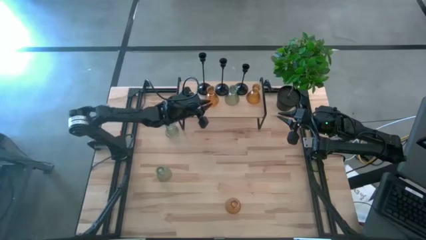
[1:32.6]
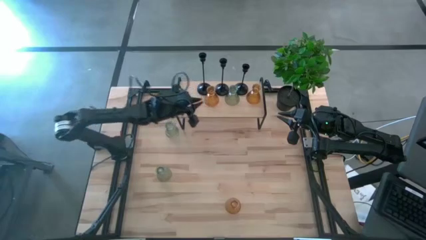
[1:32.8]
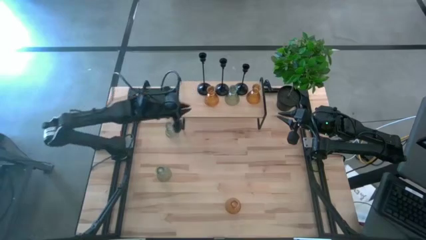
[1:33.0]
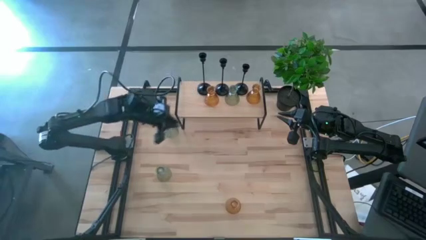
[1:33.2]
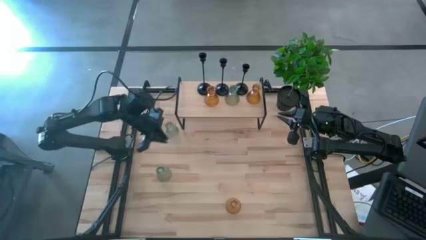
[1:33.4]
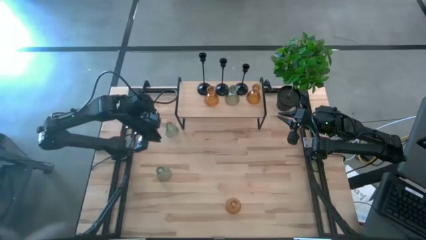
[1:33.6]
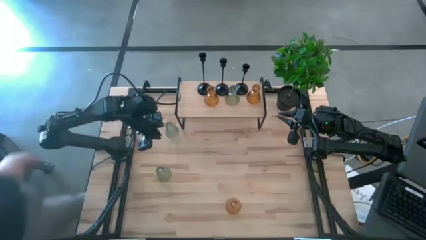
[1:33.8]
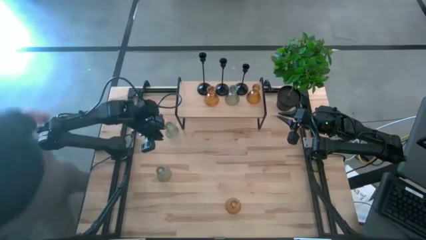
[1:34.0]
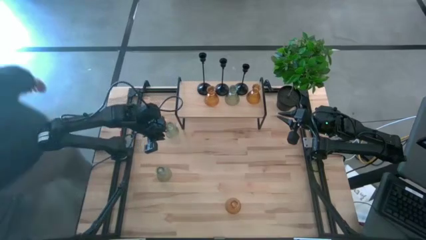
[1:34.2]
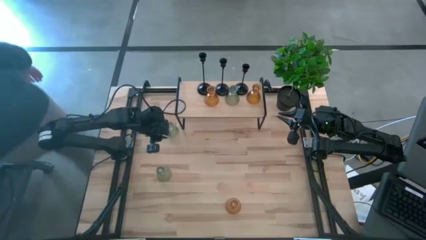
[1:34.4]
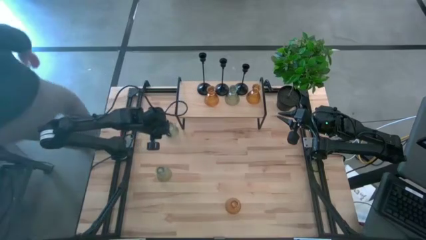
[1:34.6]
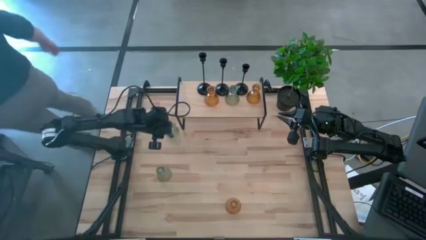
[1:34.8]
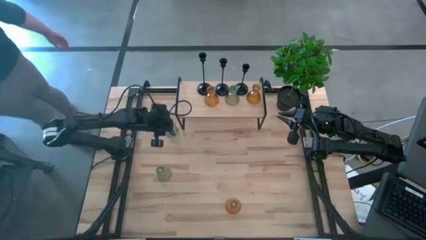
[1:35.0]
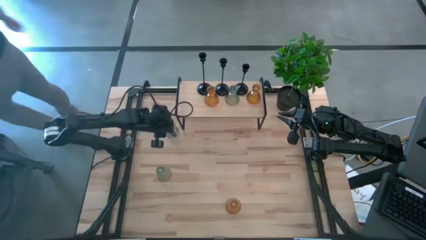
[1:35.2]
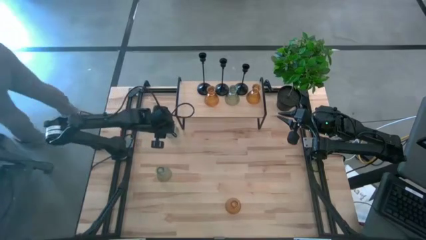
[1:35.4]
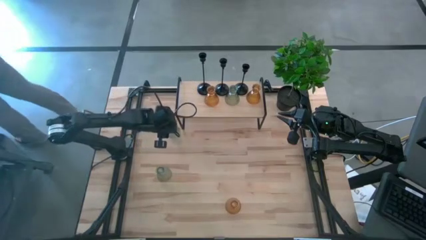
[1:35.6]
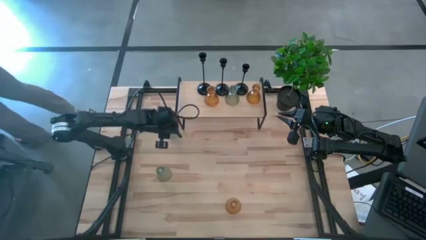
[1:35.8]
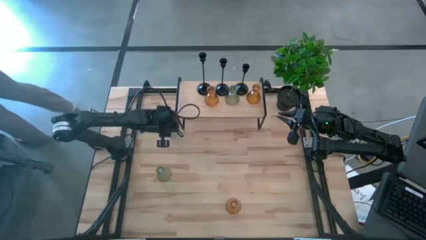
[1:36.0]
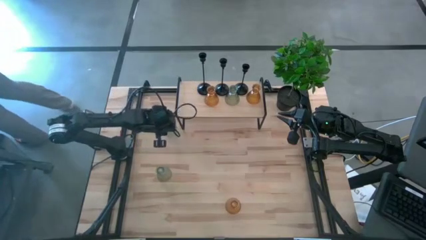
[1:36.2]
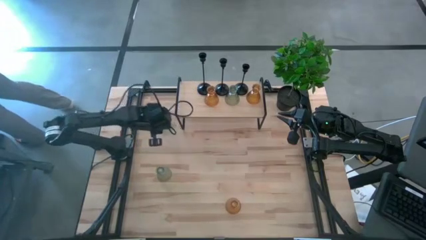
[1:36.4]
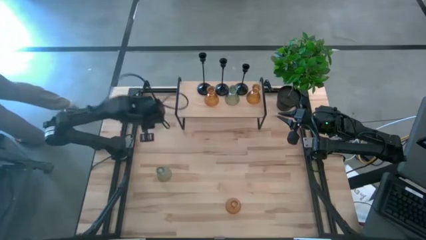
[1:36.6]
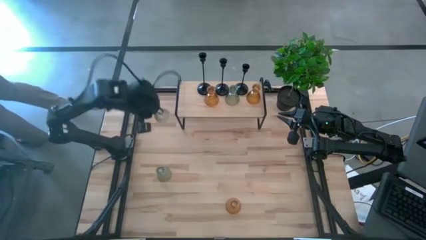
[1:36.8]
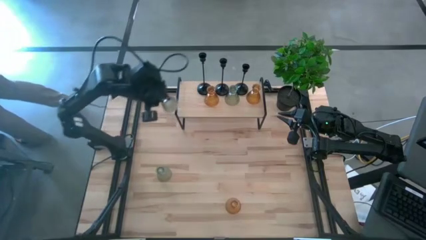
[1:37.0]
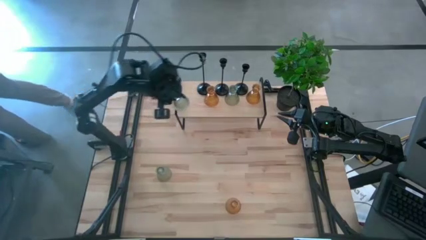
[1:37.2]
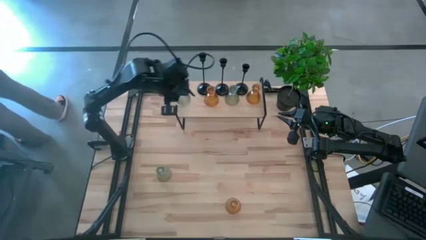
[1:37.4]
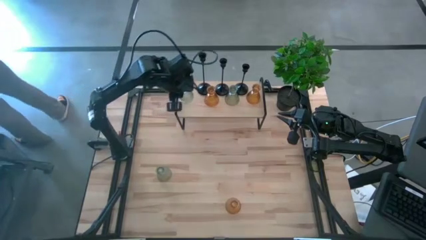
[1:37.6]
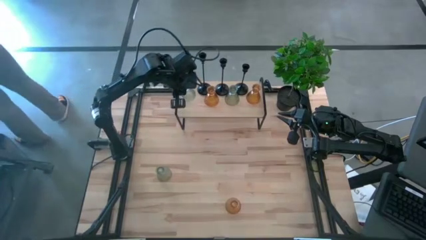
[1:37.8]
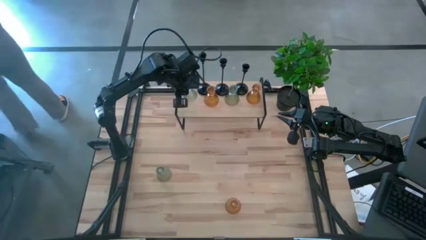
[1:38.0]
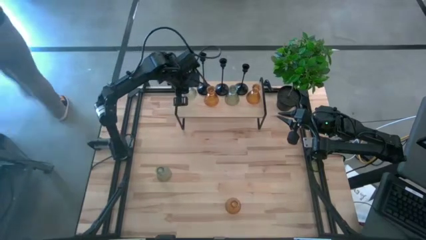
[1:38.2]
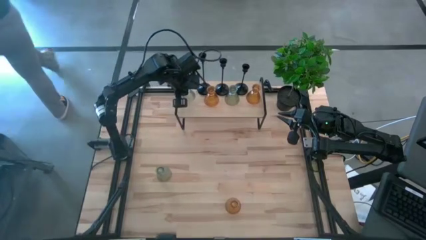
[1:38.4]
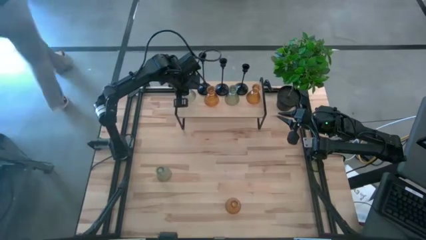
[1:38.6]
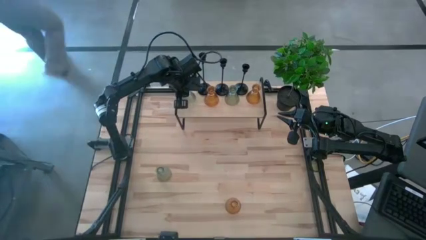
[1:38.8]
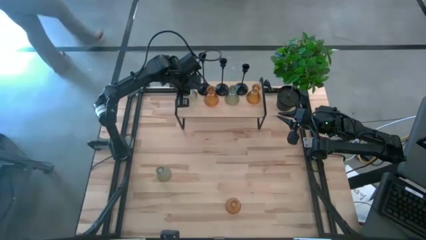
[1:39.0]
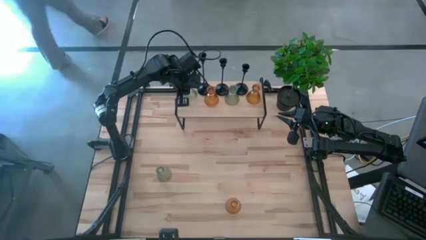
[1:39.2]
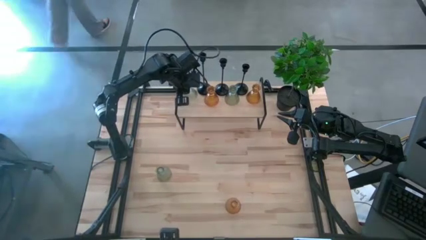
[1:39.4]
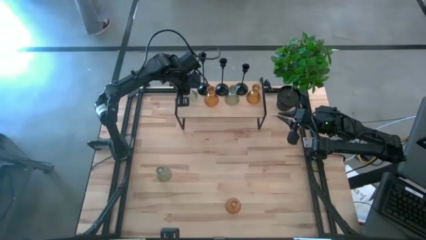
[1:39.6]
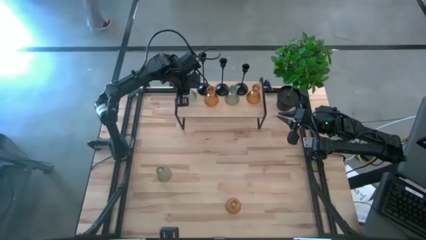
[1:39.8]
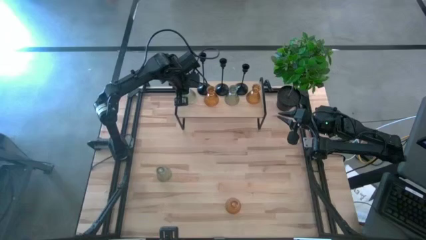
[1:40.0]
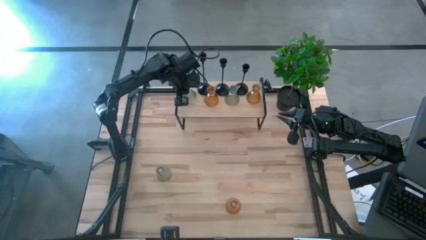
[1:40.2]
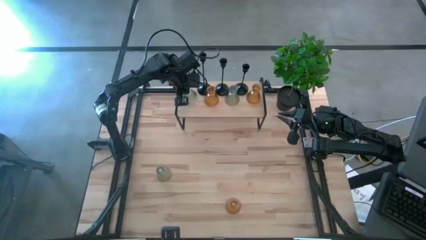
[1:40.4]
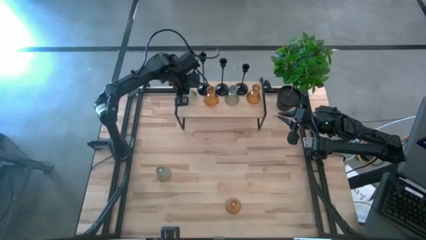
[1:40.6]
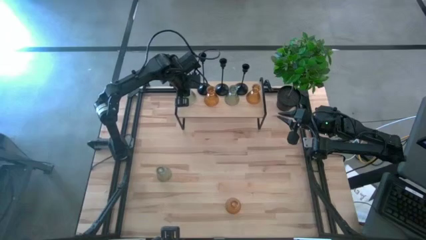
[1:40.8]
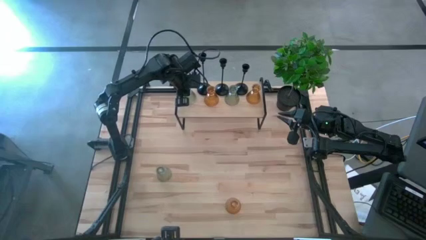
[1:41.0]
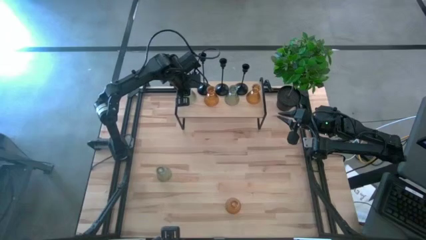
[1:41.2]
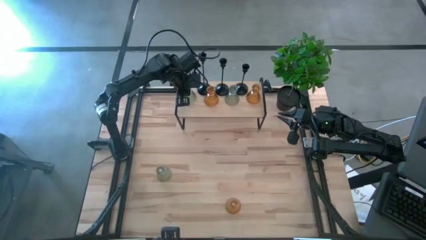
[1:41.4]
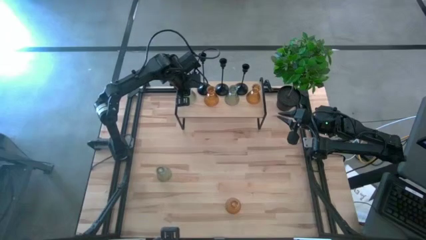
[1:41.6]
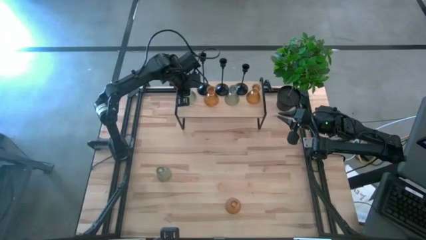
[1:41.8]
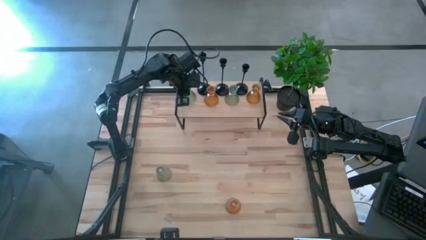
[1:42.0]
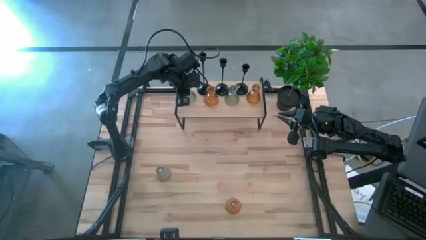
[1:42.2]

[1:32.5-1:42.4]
Task: Pick & Place candle stick holders
Put the top green candle holder on the shelf

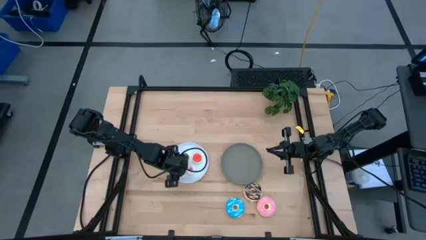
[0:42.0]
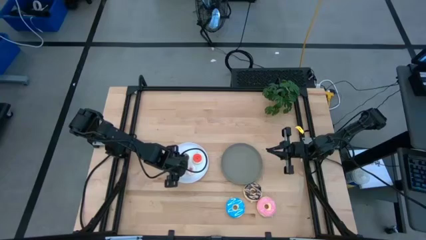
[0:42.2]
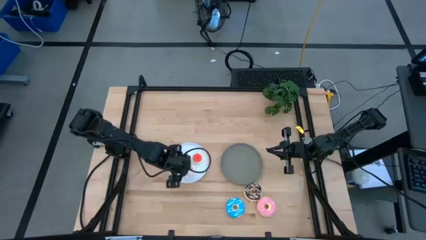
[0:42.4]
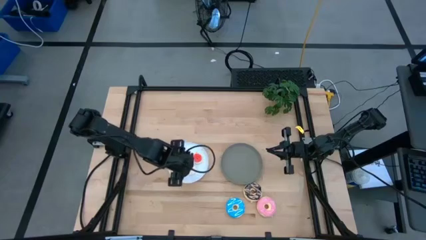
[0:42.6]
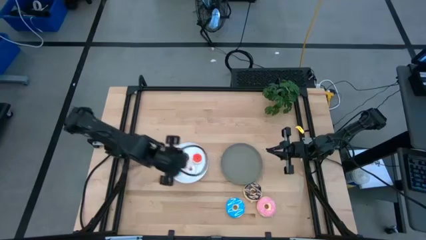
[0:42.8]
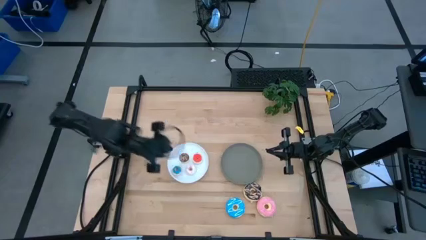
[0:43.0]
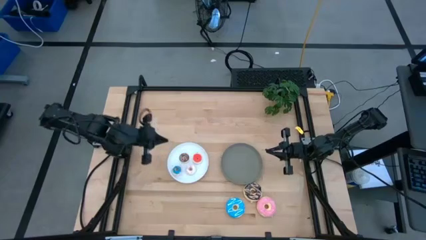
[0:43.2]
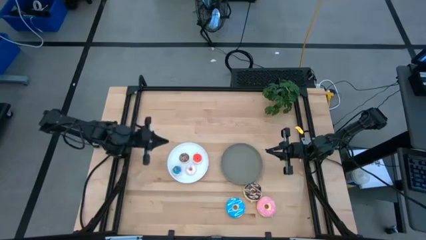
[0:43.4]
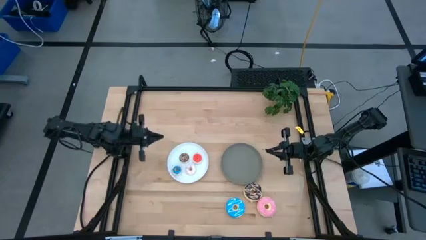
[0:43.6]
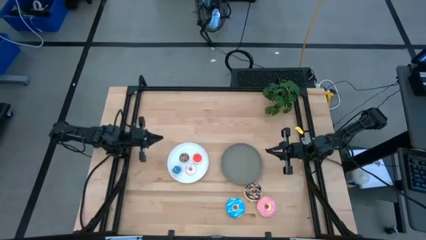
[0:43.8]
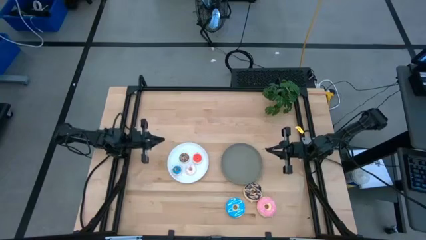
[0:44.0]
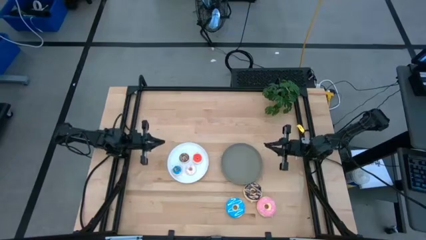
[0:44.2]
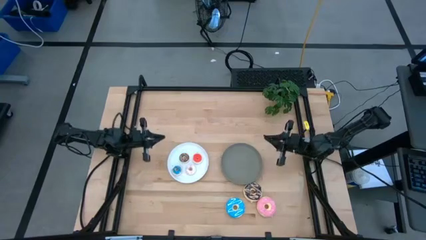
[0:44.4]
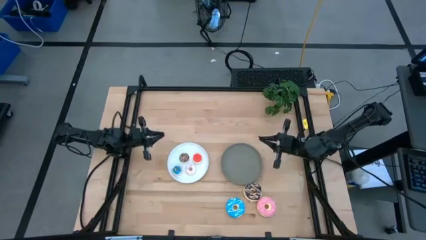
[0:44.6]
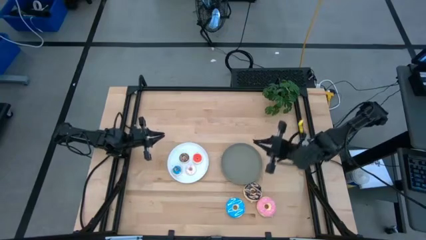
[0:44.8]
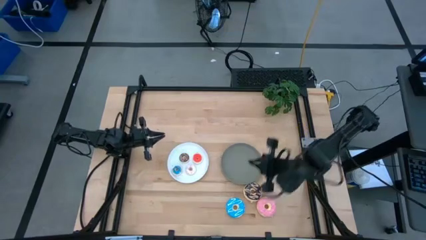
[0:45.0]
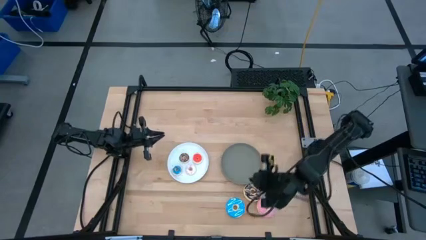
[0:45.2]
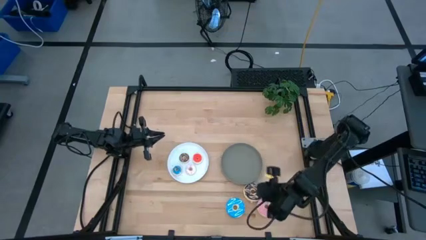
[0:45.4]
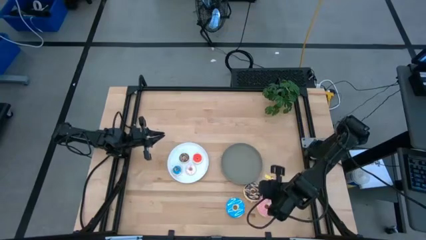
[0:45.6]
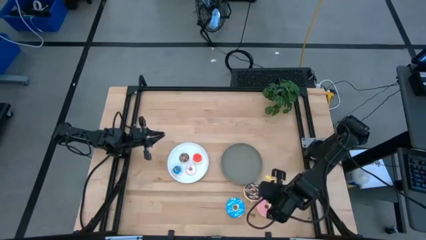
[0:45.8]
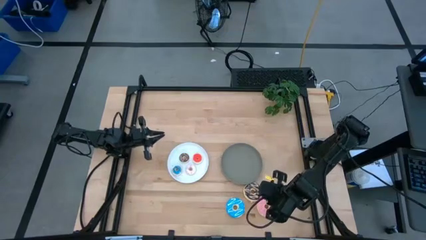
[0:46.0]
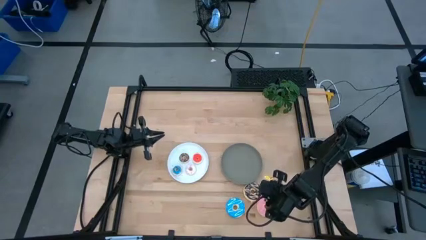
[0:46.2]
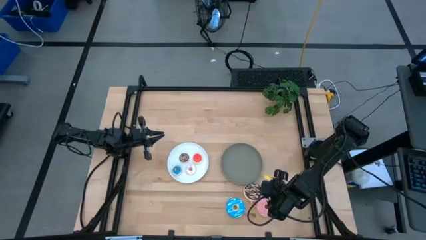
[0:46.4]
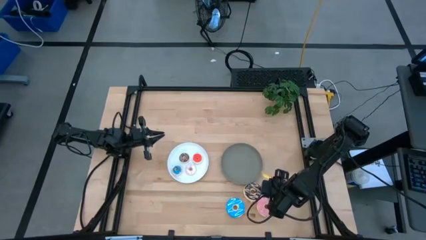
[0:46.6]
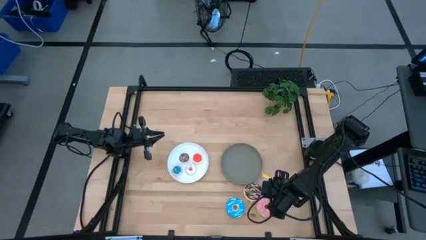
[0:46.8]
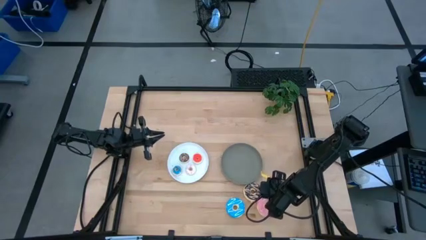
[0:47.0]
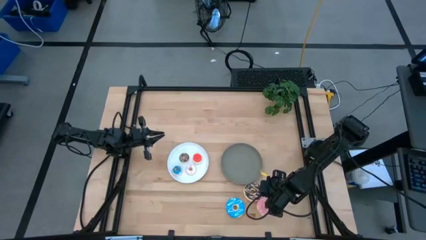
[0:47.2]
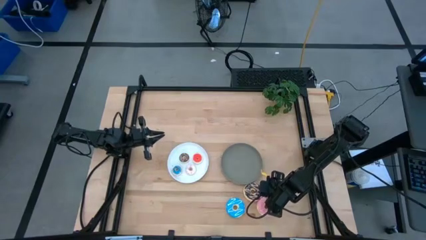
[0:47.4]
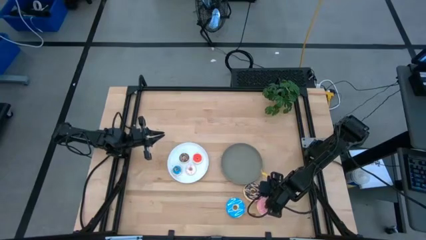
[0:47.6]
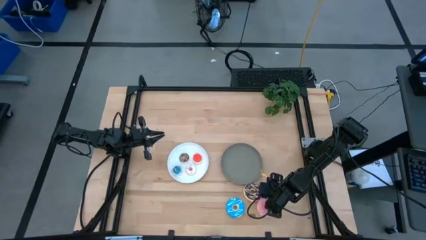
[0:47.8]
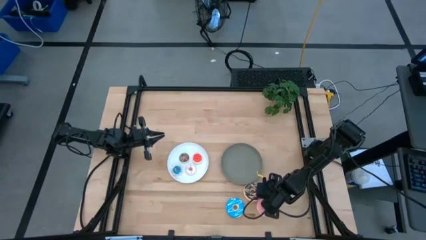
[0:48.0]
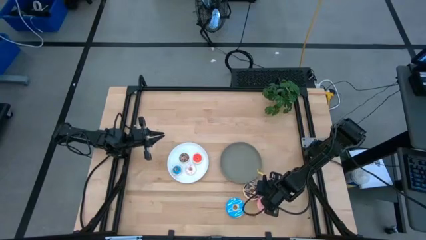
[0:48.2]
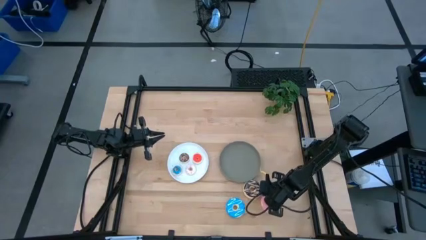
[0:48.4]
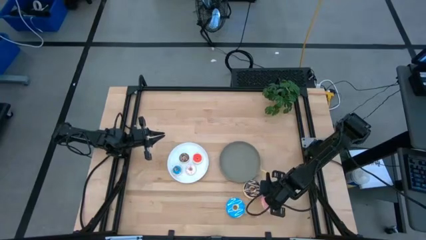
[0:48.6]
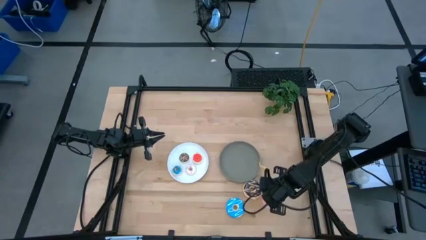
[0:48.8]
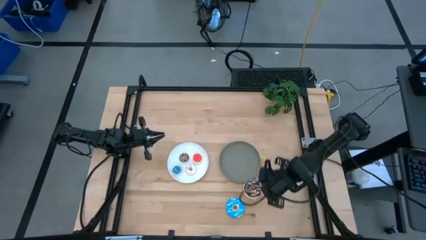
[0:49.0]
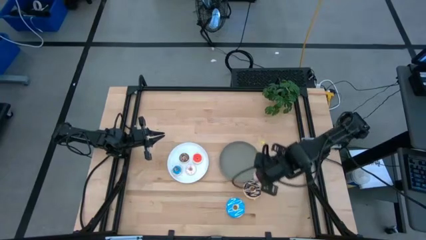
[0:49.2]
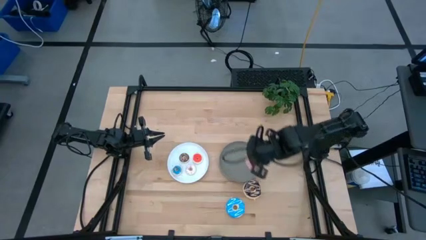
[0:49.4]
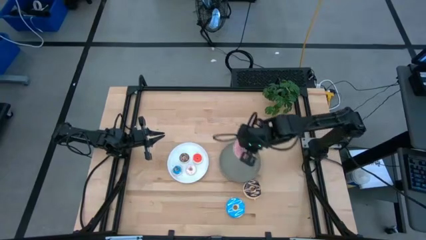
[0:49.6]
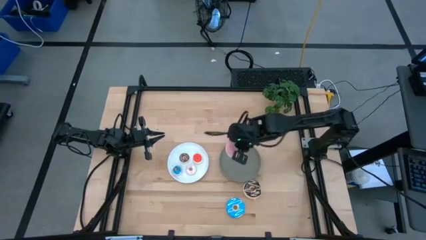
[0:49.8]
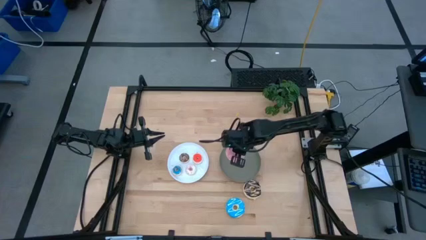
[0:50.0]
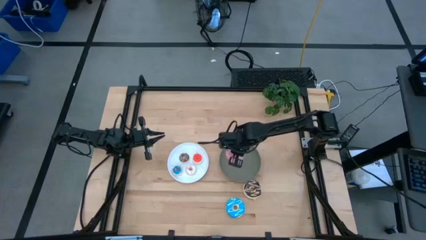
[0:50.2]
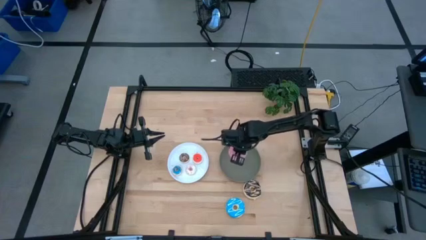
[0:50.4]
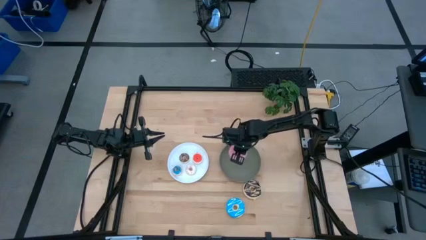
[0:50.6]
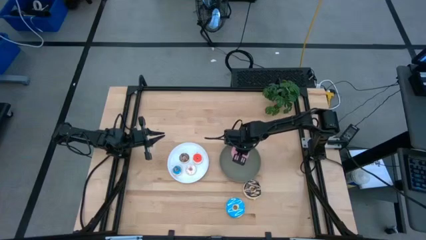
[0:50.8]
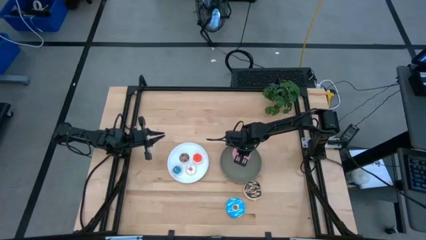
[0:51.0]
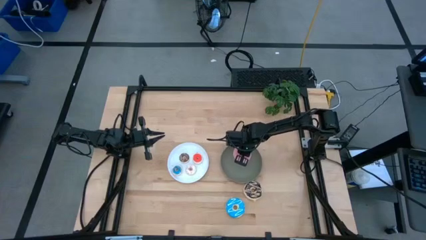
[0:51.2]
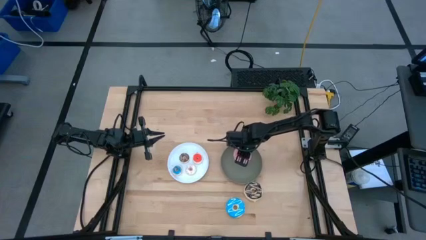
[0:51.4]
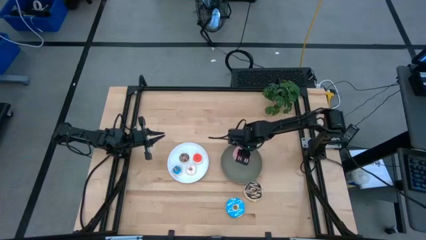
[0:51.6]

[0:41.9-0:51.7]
Task: Pick & Place donuts
Put the big pink donut on the gray plate
